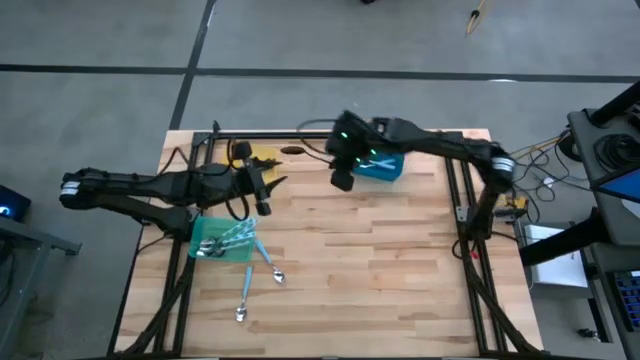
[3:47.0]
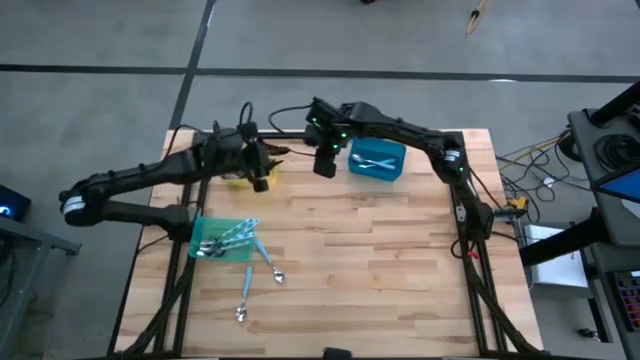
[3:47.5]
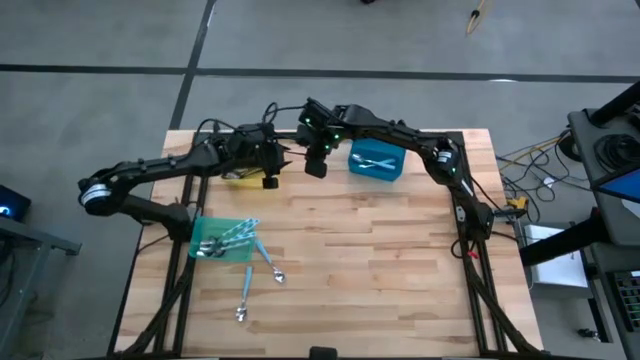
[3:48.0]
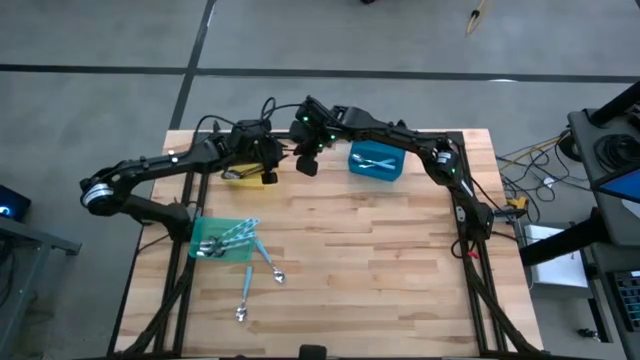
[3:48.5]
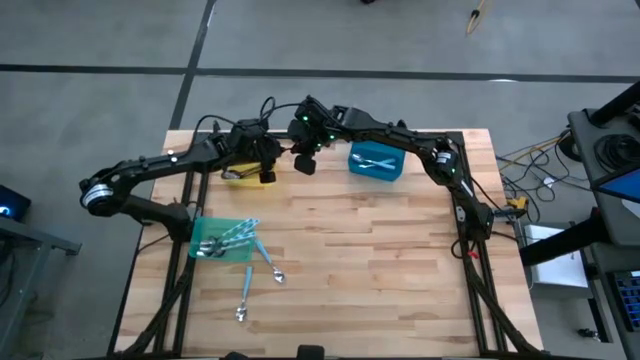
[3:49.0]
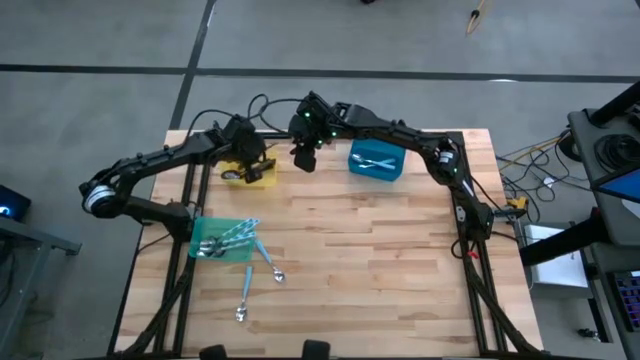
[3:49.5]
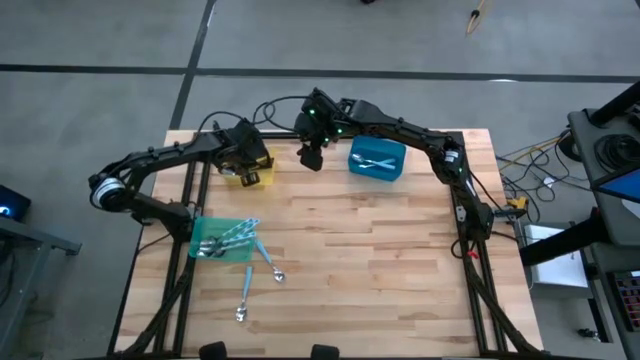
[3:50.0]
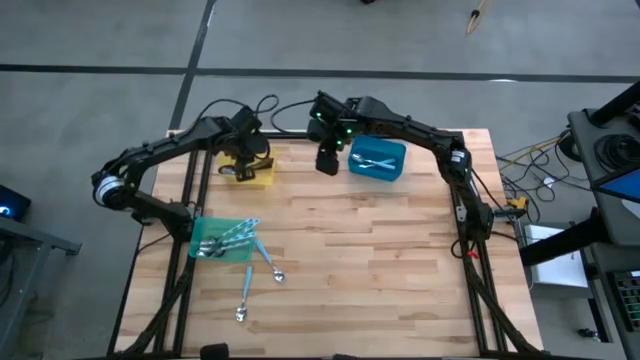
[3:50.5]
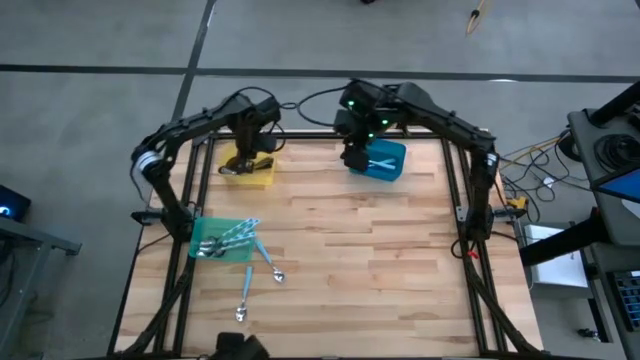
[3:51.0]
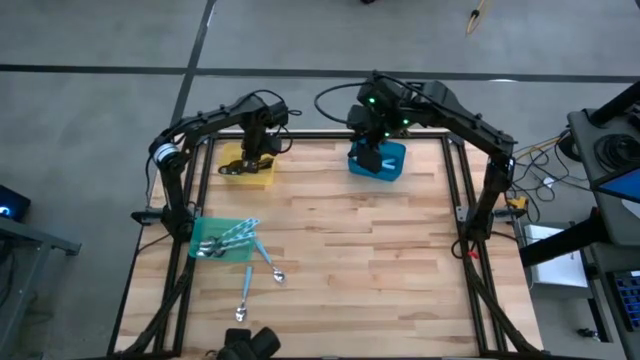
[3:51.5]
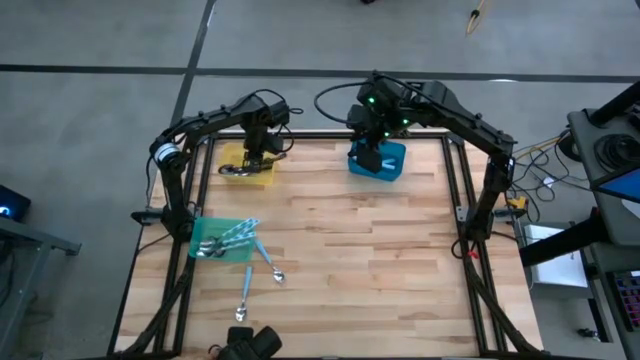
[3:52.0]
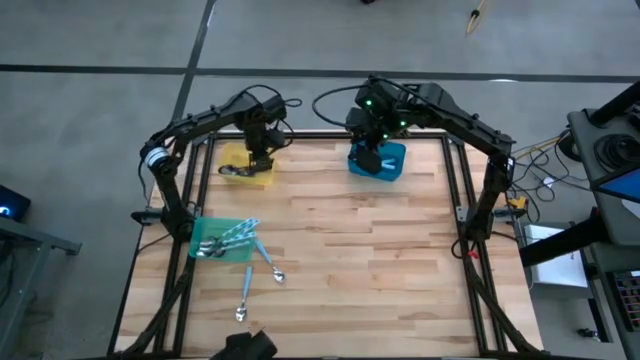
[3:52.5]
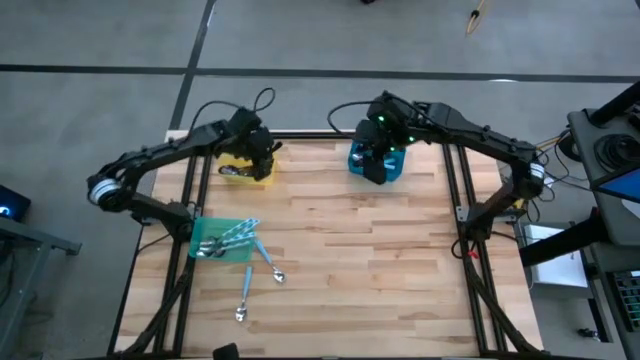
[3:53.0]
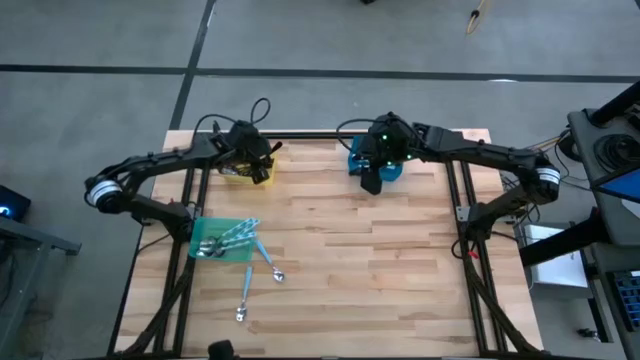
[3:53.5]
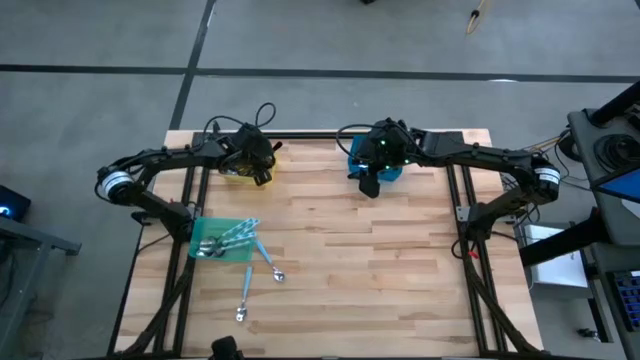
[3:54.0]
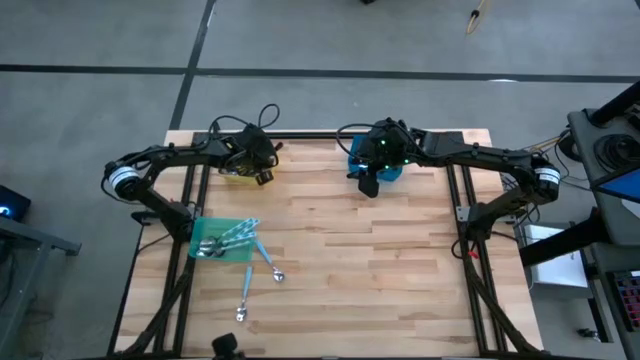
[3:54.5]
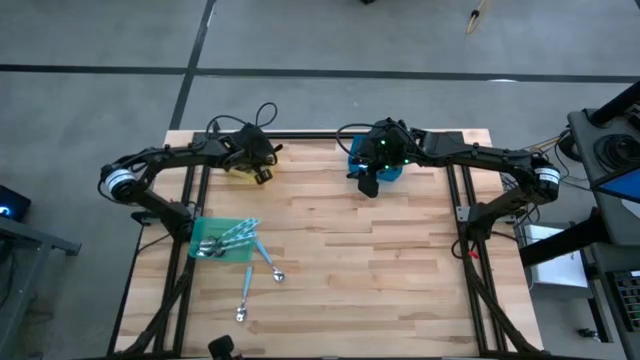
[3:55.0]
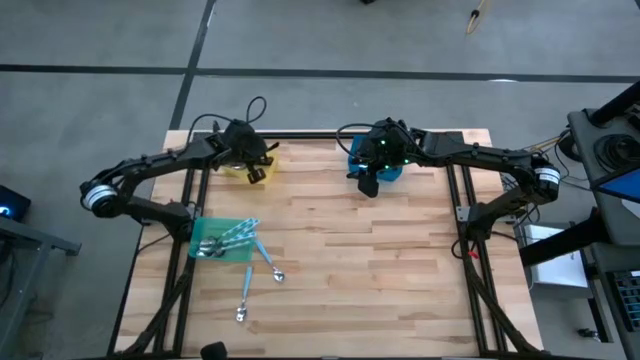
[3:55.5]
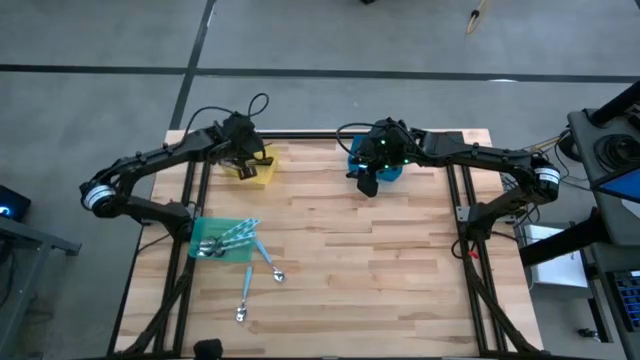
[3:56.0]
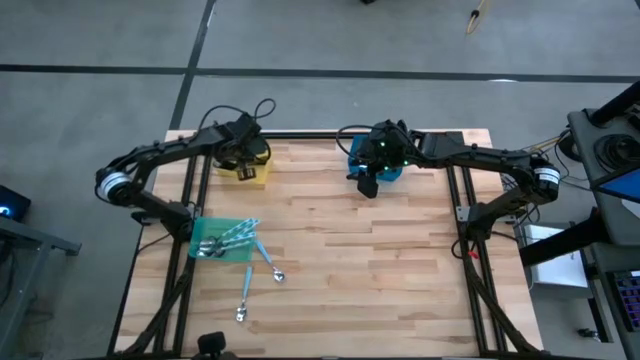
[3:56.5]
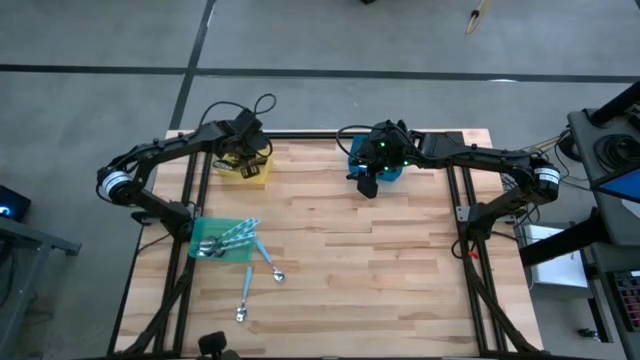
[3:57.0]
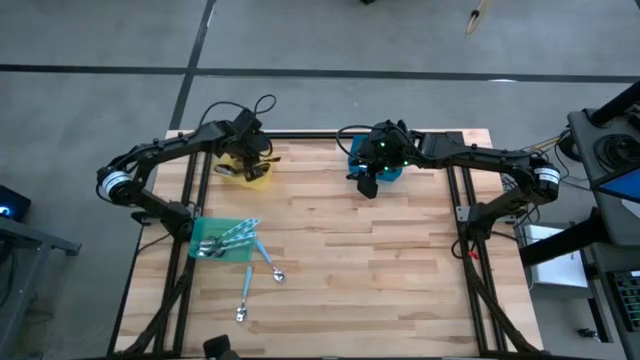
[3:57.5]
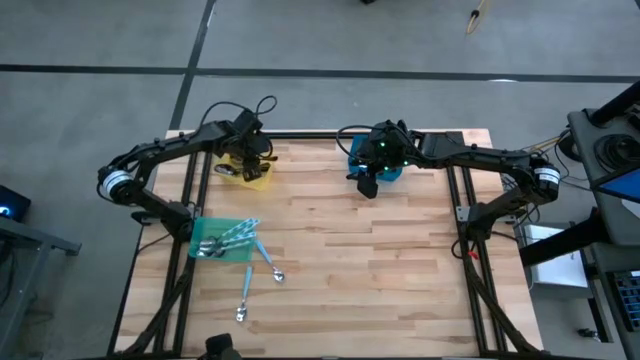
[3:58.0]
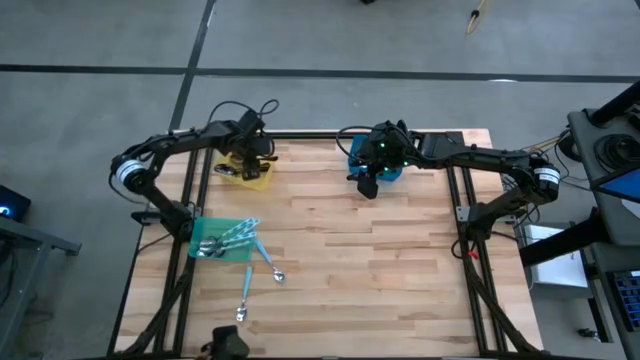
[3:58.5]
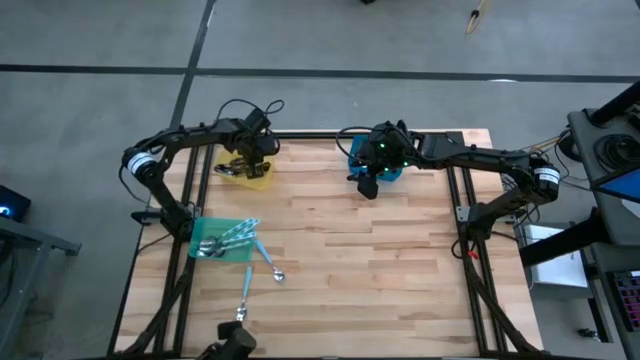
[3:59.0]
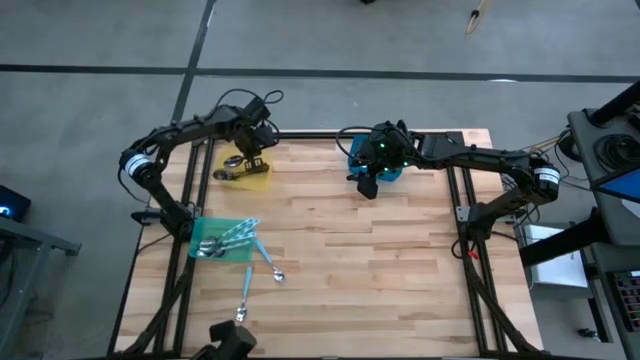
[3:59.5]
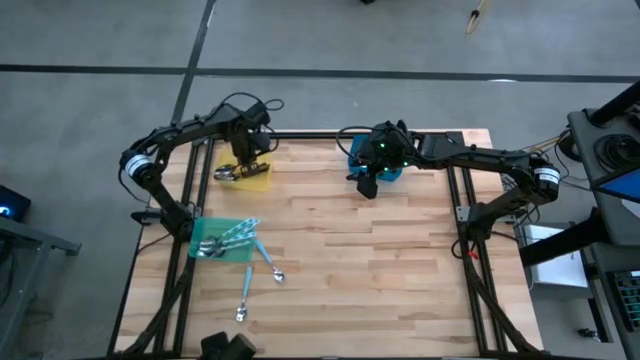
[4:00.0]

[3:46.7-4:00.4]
Task: Sort silverware by color (type)
Put the black spoon into the yellow bin

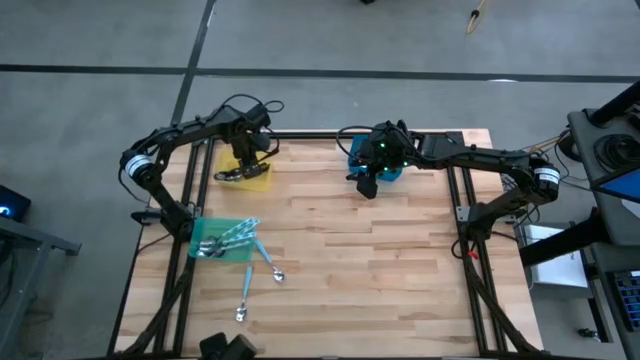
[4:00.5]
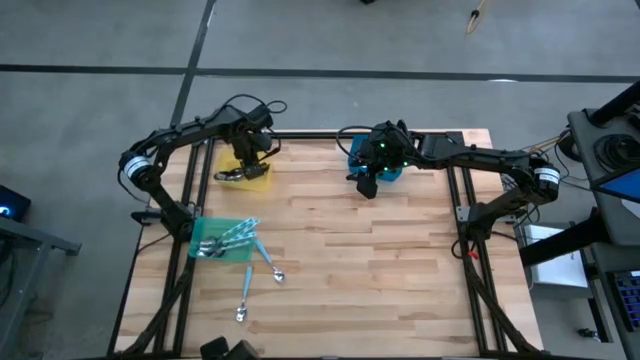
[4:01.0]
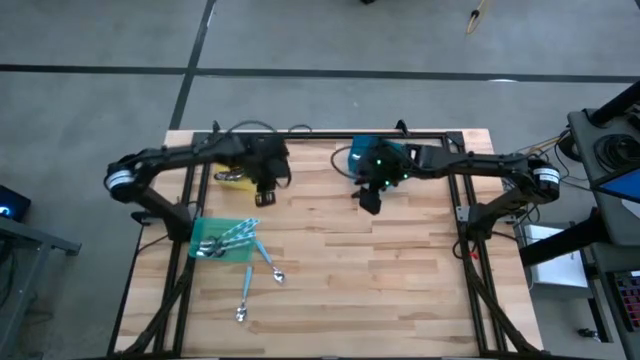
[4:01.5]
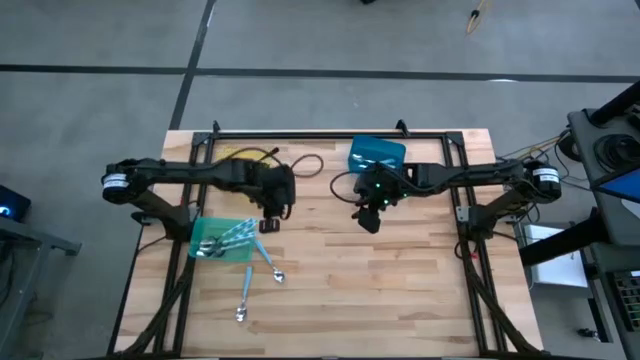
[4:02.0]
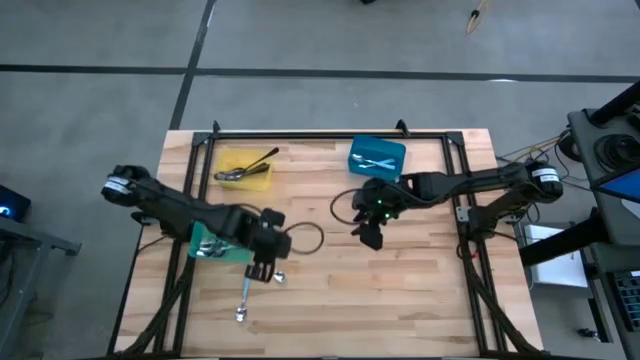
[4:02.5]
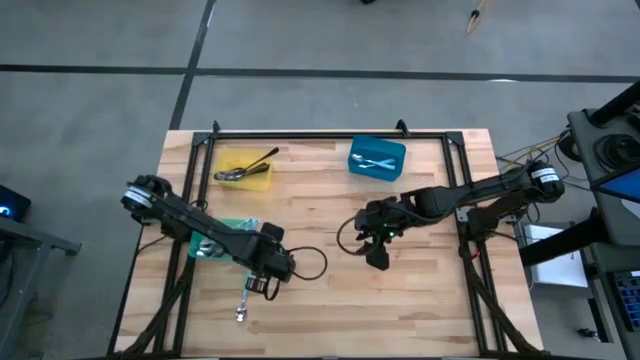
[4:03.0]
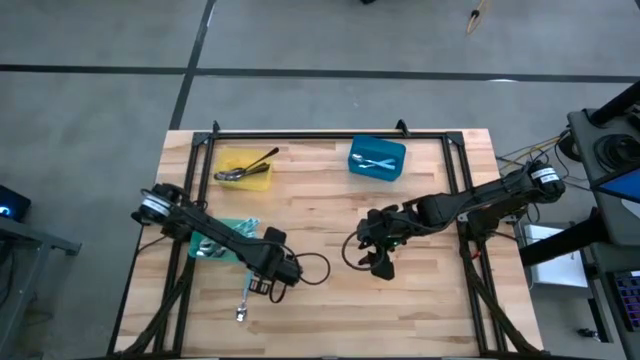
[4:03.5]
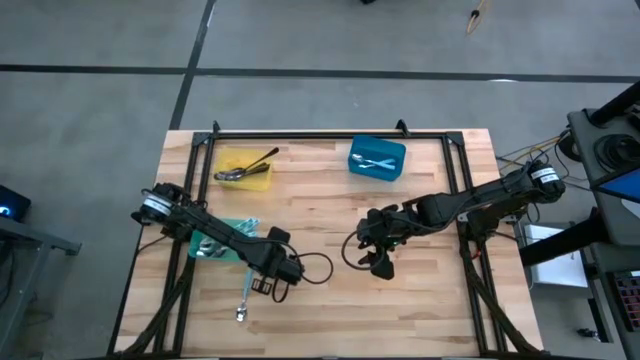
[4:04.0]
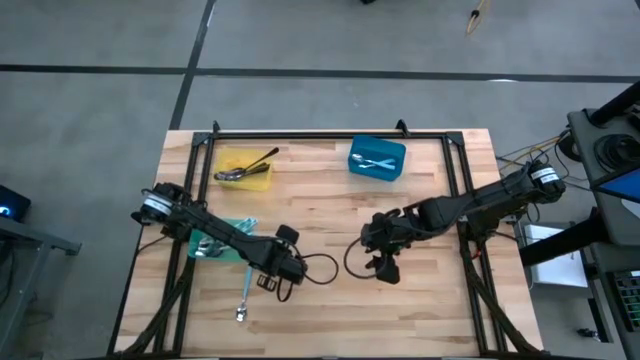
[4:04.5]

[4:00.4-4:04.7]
Put the blue spoon into the blue bin

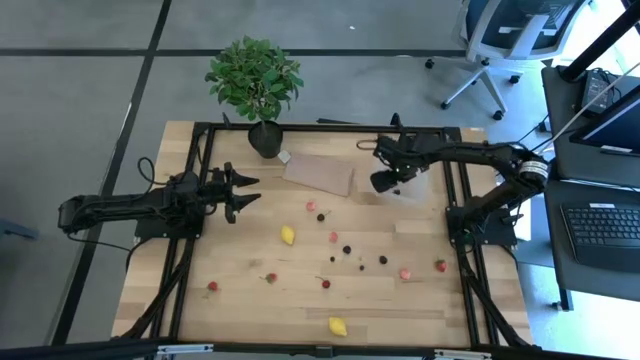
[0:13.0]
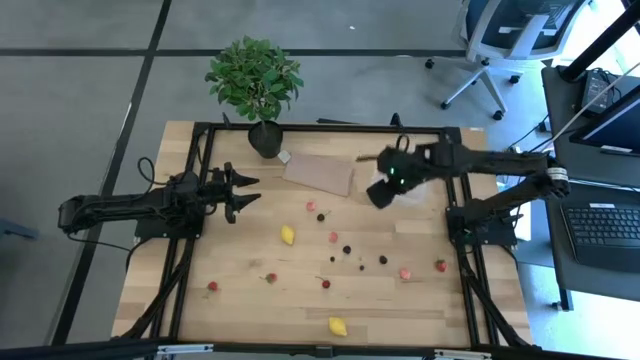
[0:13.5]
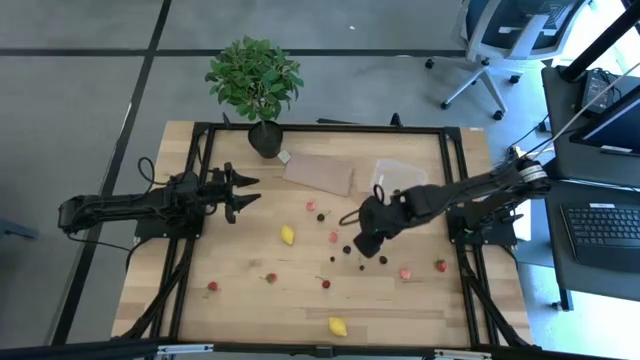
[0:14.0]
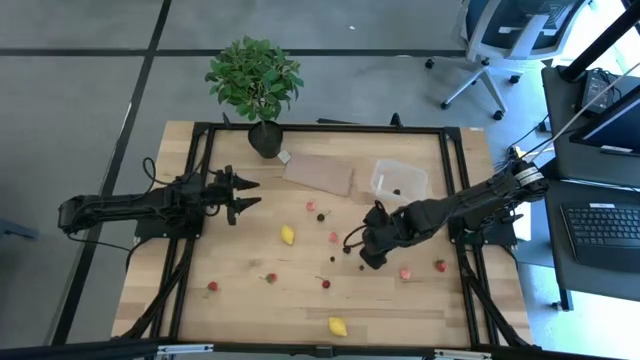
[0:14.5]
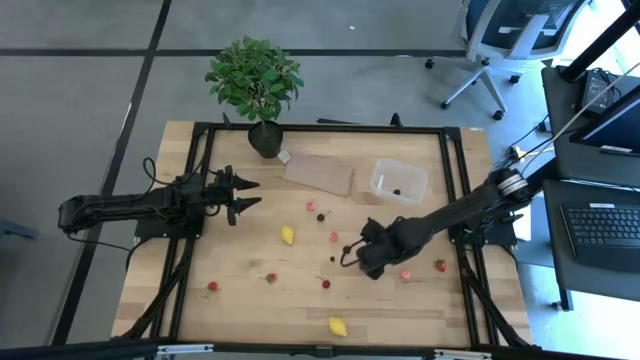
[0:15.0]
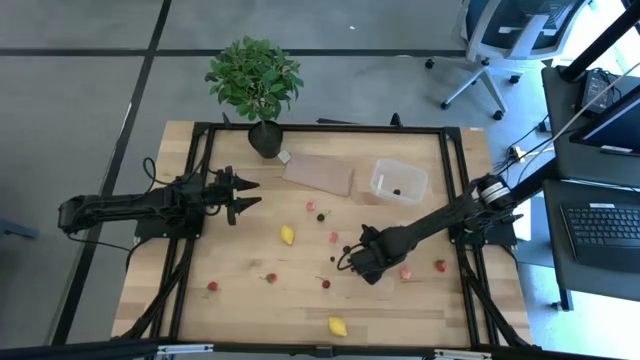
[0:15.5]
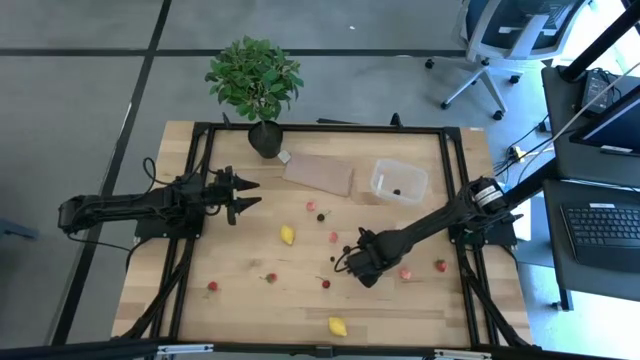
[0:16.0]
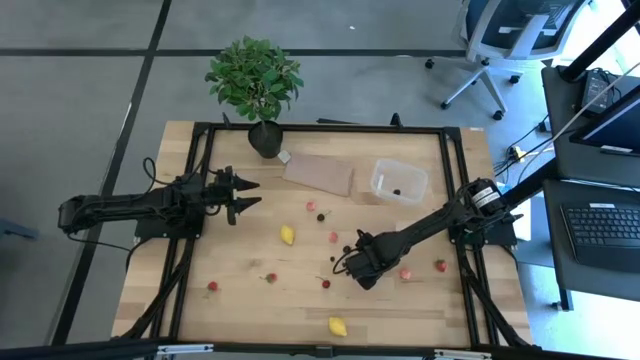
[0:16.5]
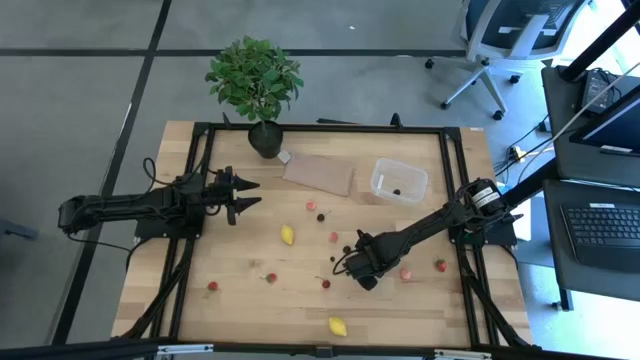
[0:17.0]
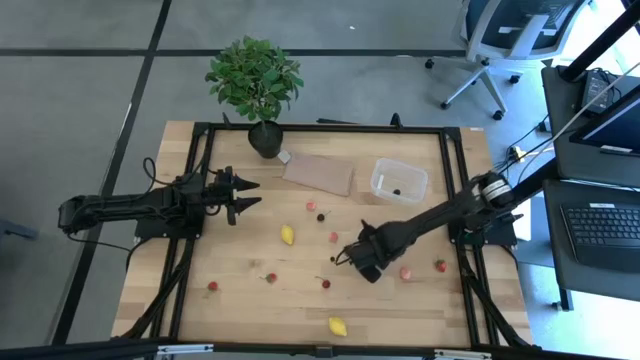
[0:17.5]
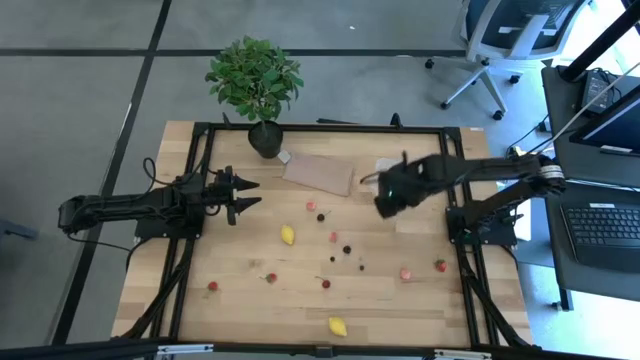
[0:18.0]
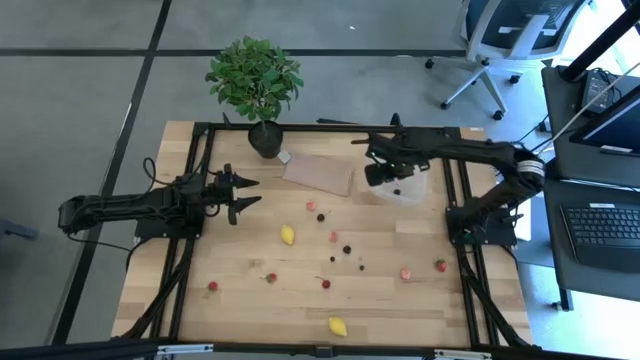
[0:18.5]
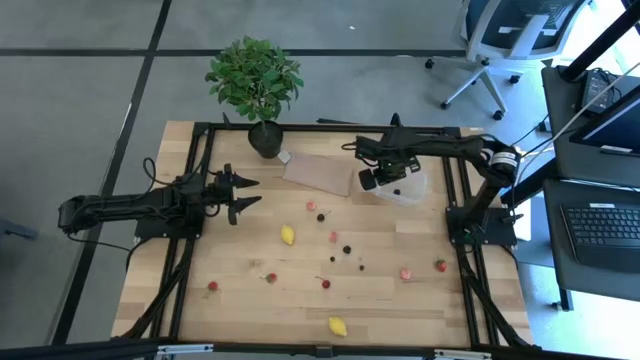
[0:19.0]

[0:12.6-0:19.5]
Task: Pick and placing Produce into tupperware
Put the blackberry into the transparent container
